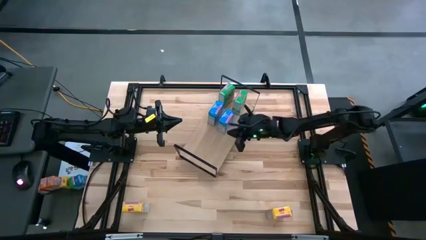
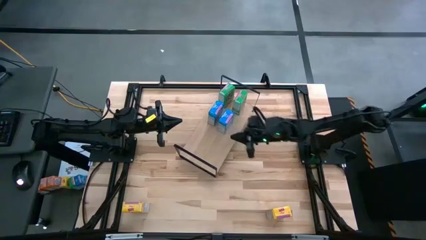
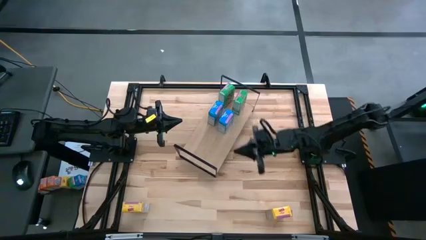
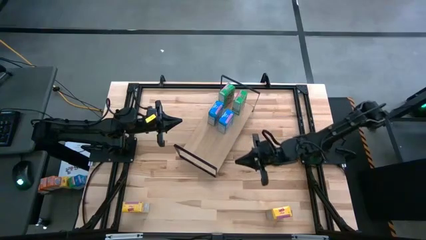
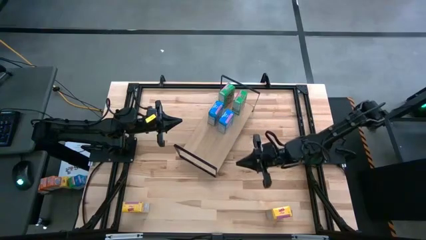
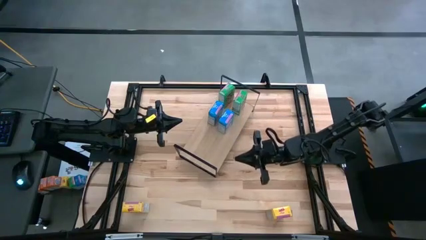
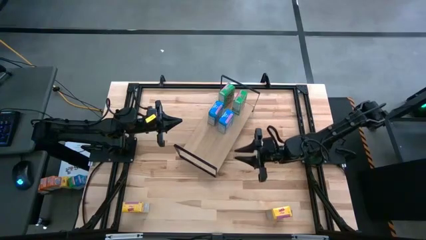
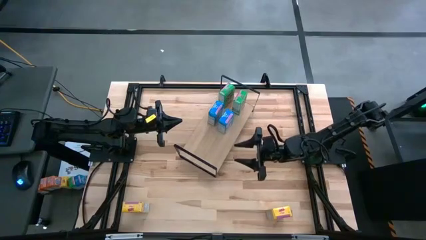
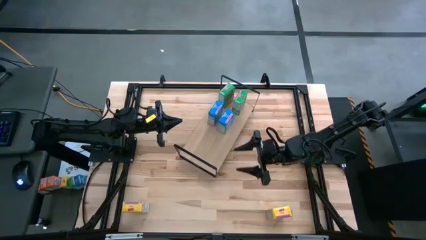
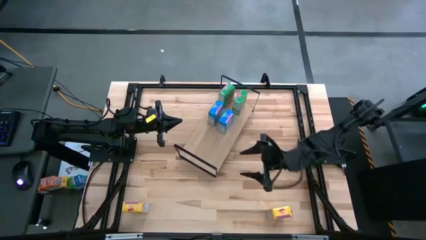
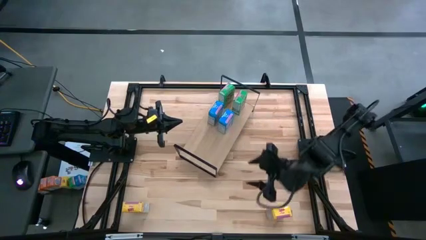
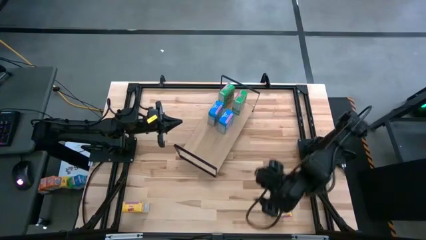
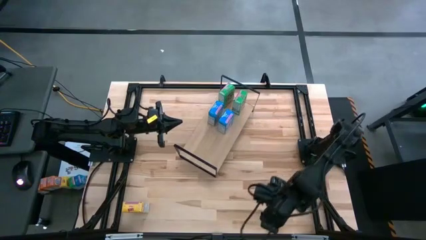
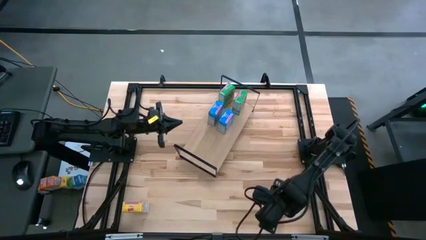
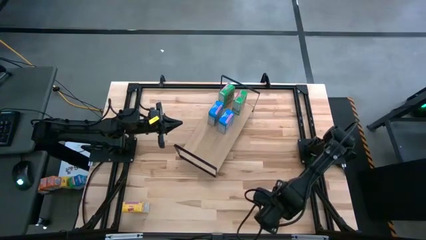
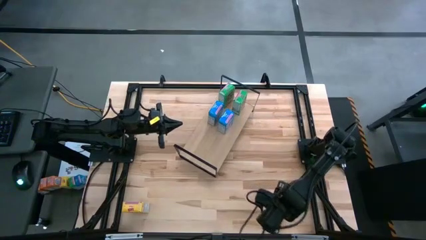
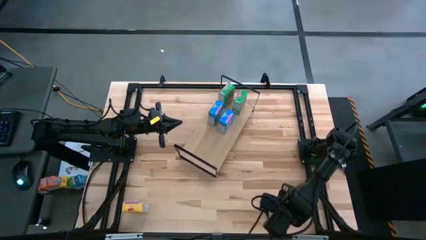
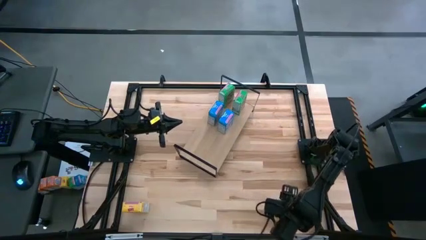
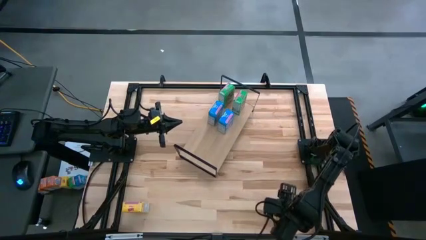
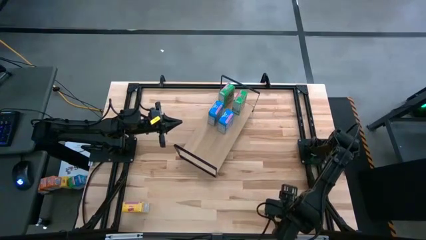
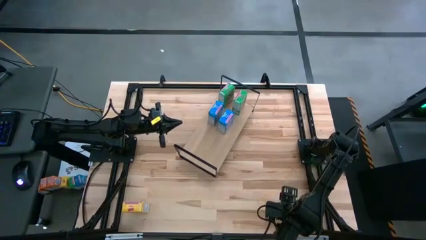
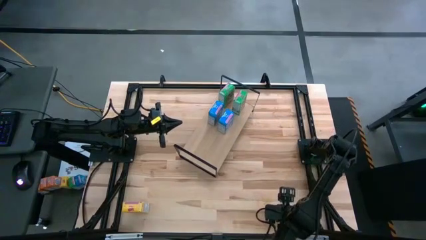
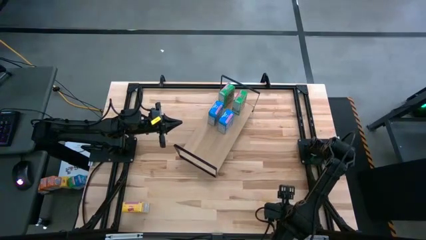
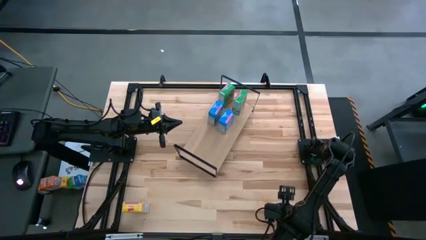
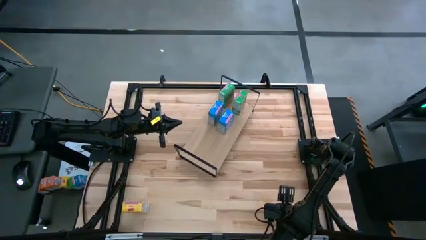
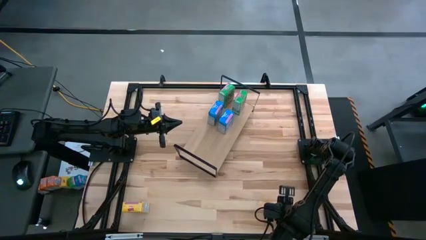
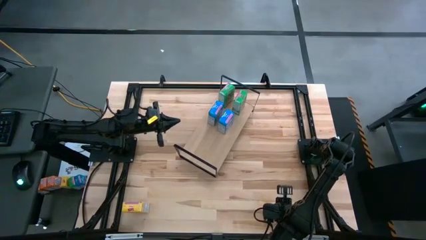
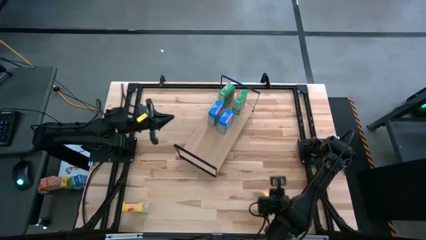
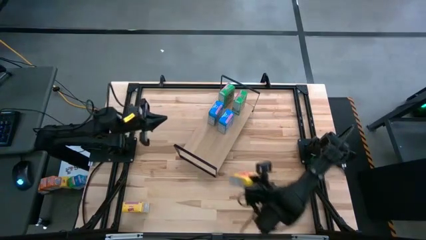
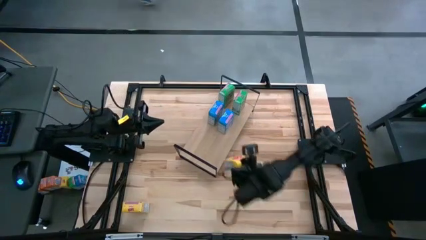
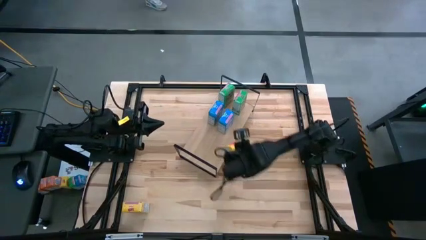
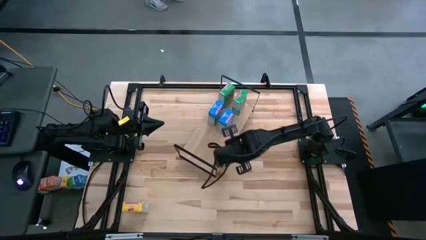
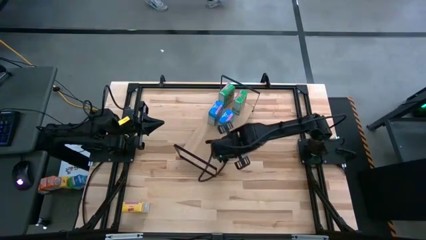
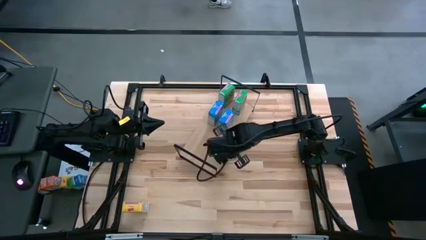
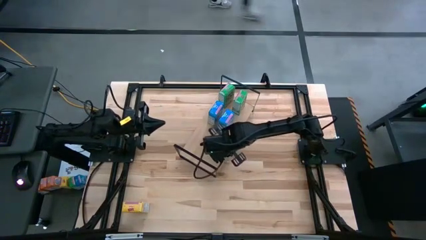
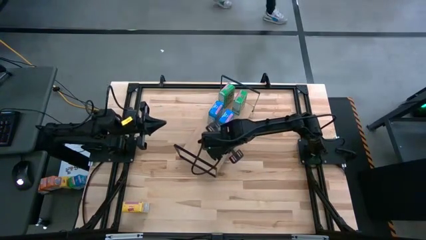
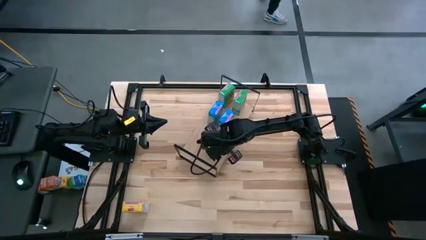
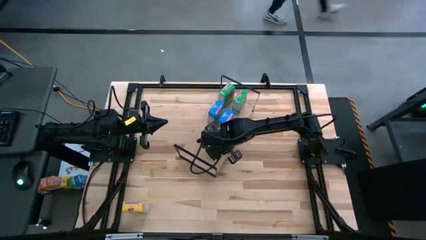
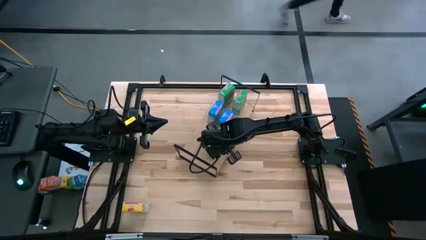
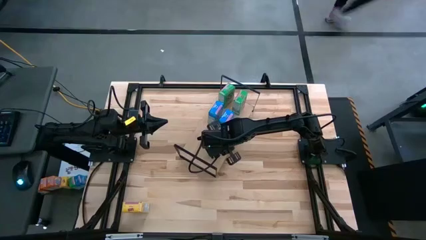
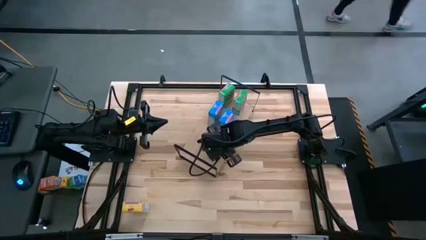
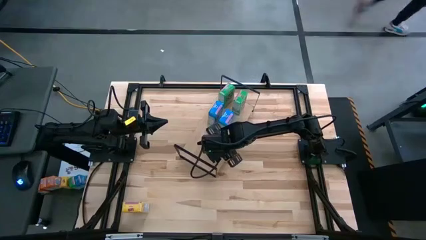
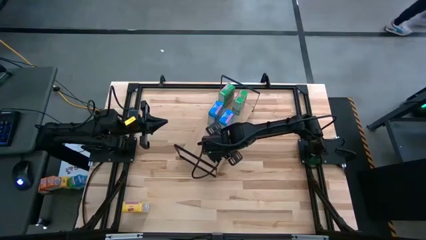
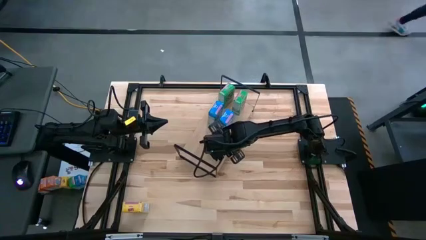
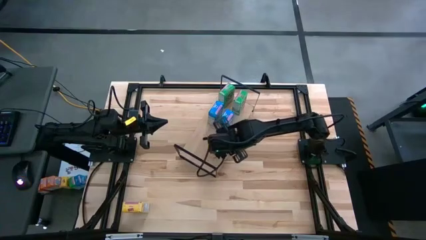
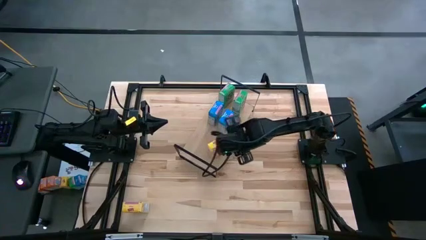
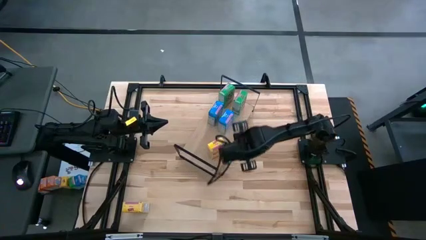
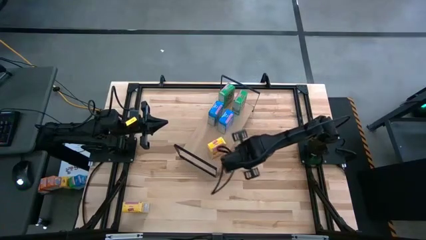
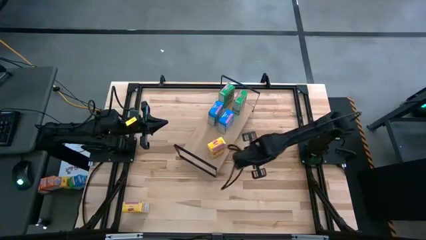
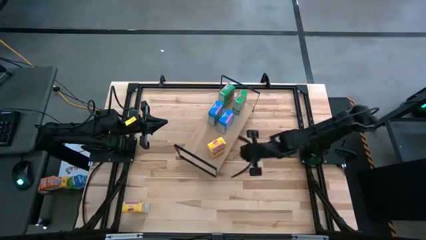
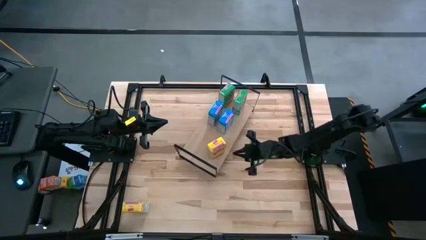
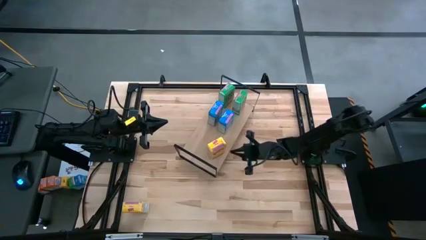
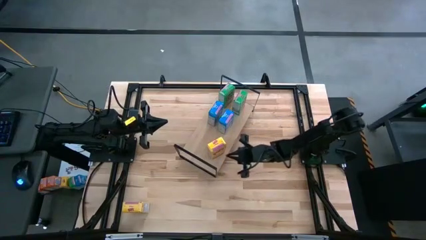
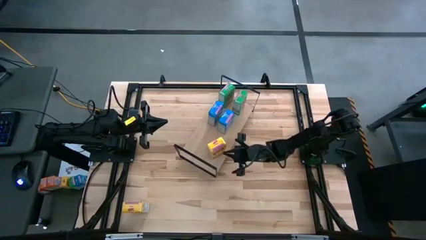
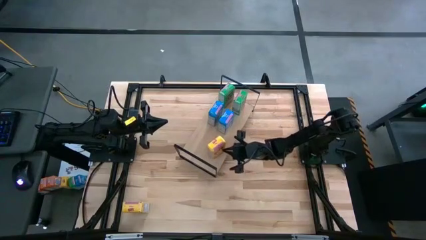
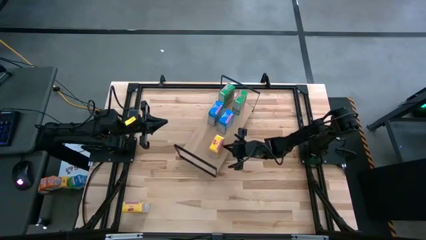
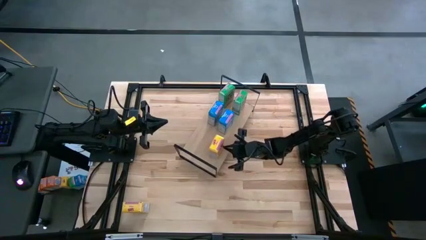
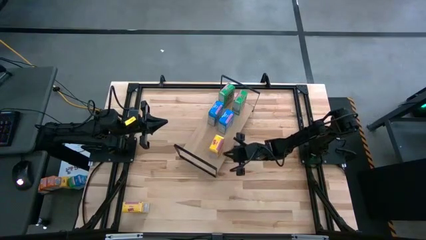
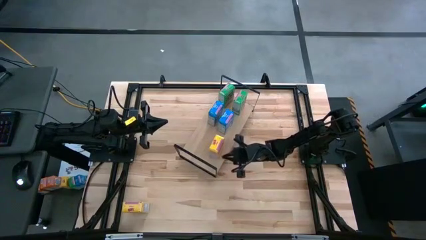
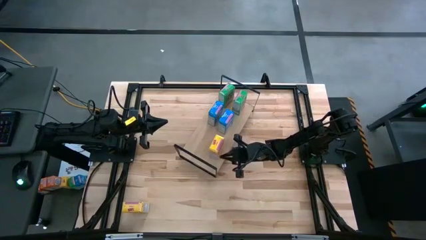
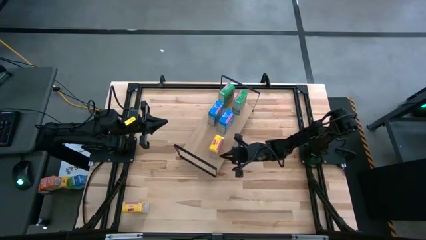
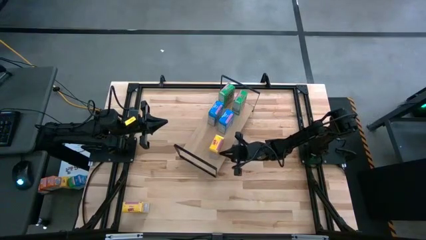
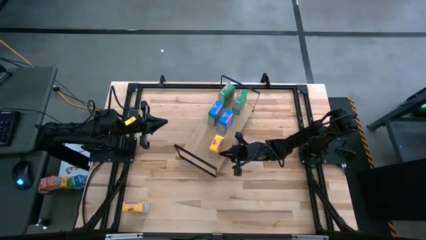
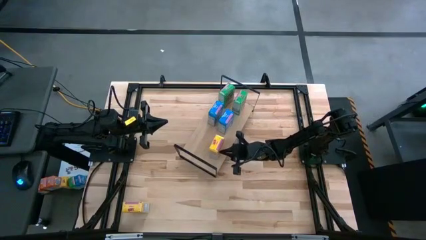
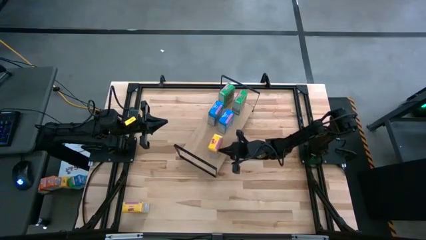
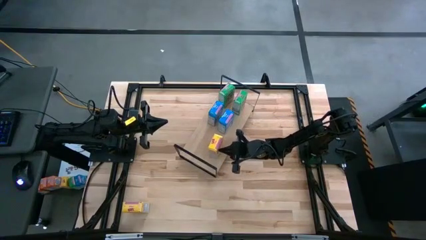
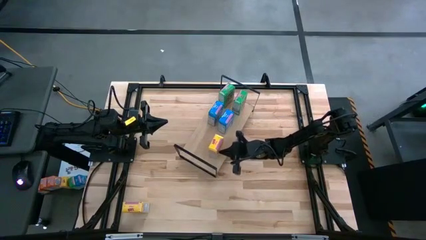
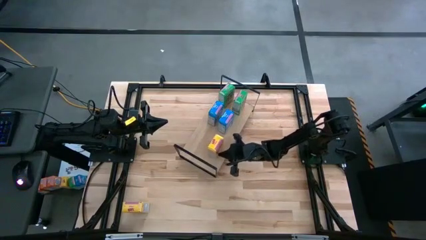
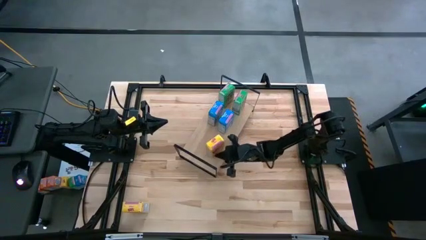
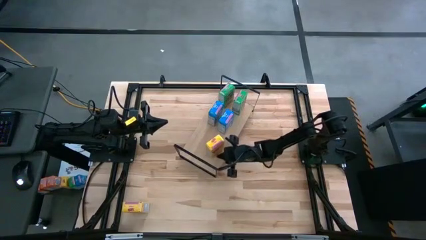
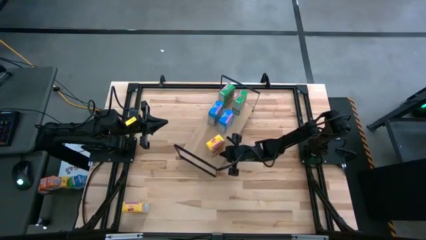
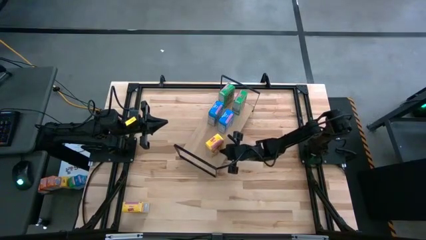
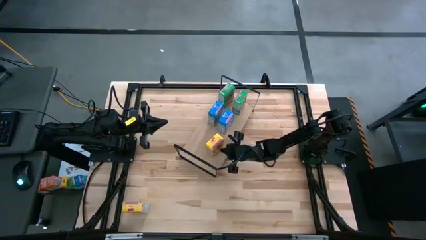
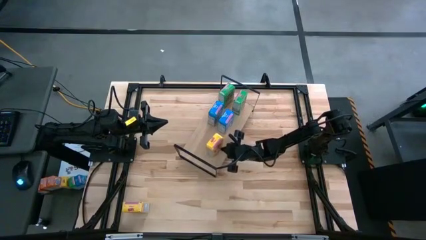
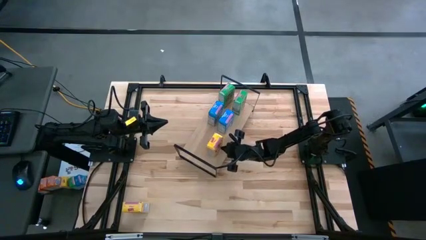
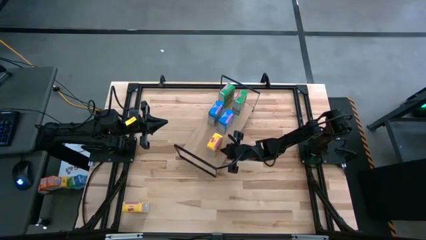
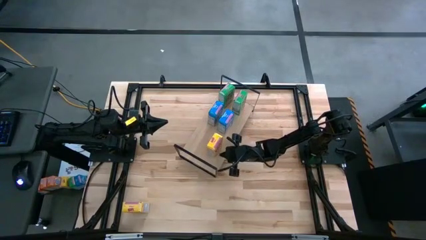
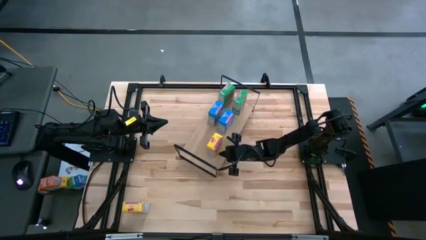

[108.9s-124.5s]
Task: Stack cereal on shelf
Put the right yellow cereal box on the shelf
